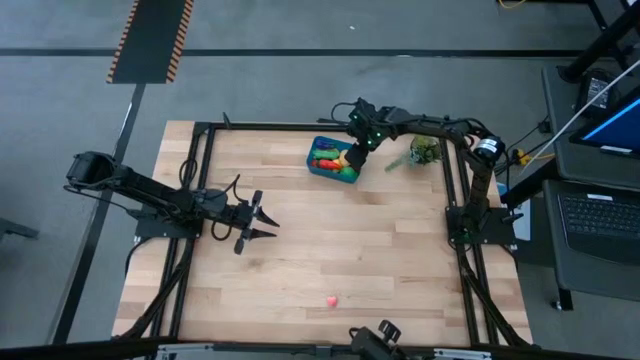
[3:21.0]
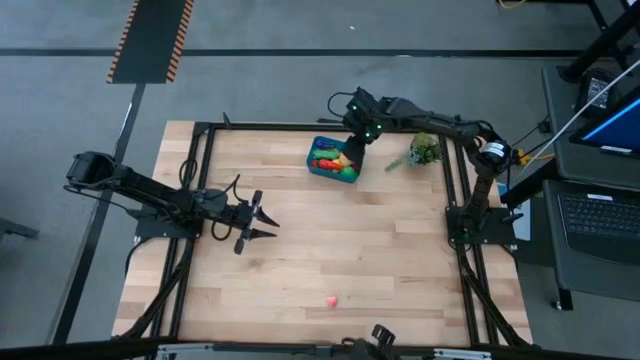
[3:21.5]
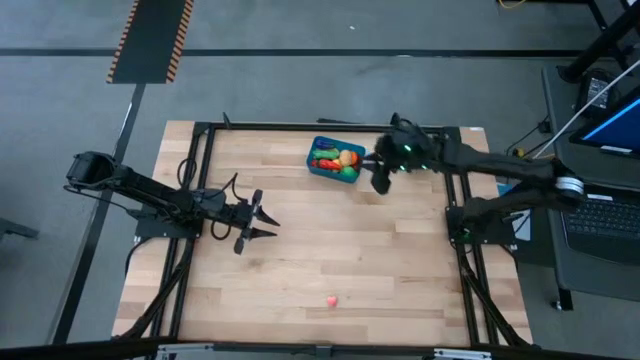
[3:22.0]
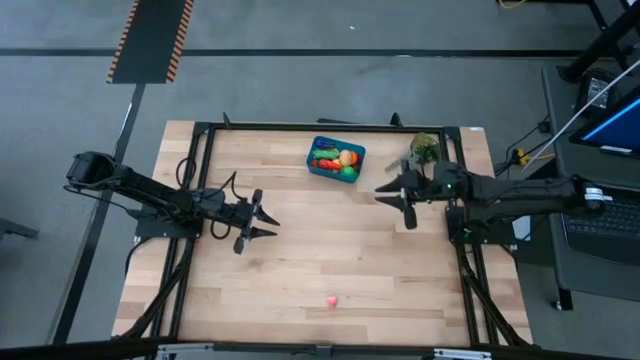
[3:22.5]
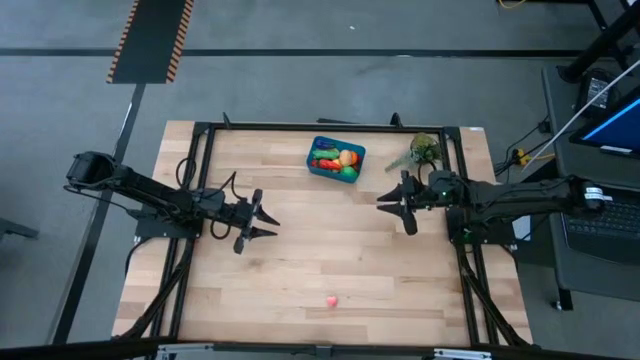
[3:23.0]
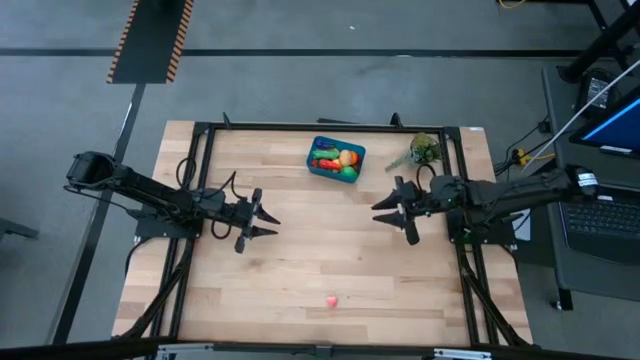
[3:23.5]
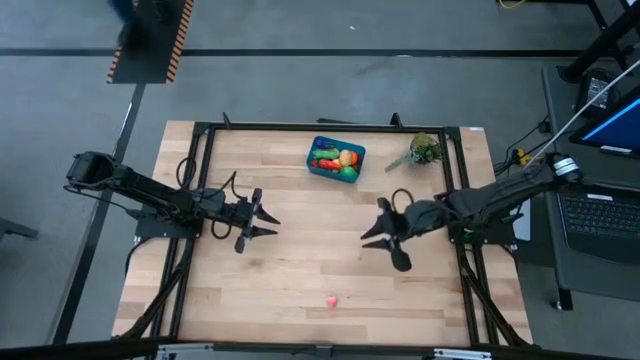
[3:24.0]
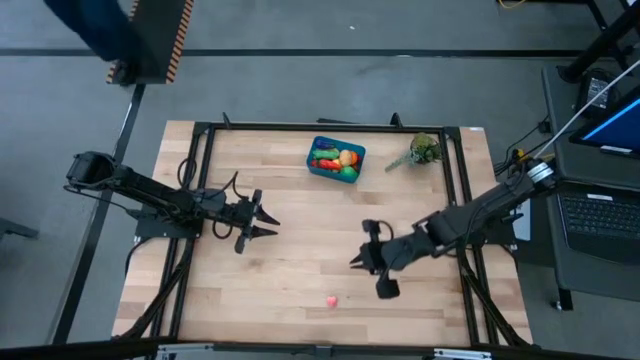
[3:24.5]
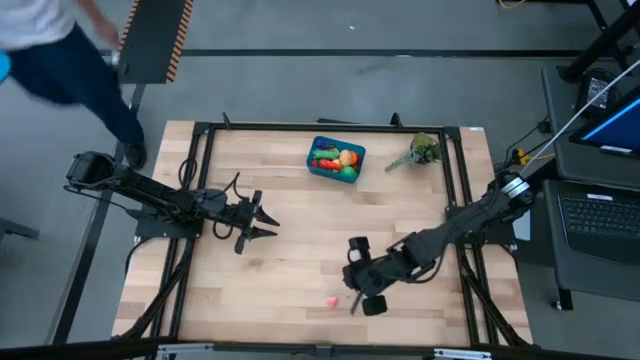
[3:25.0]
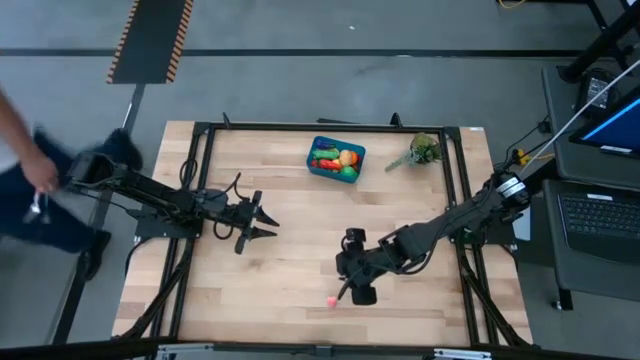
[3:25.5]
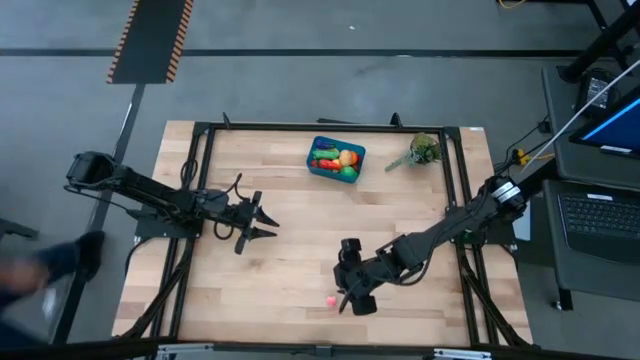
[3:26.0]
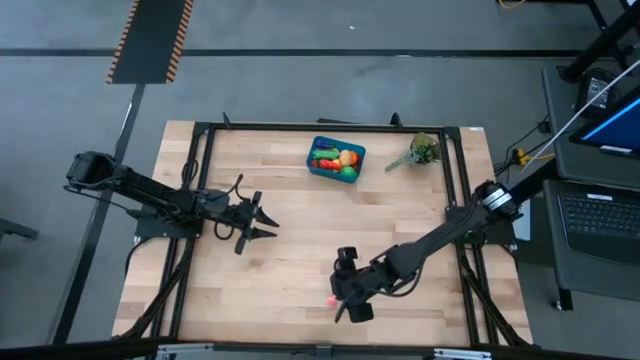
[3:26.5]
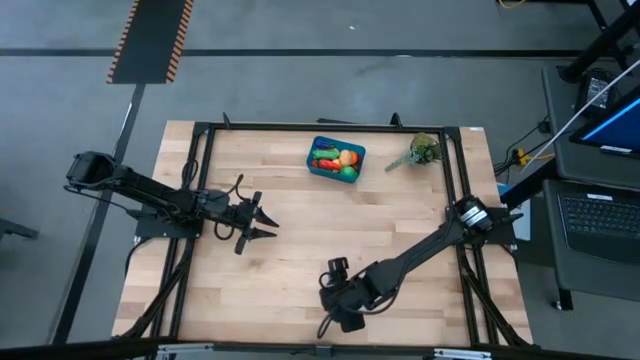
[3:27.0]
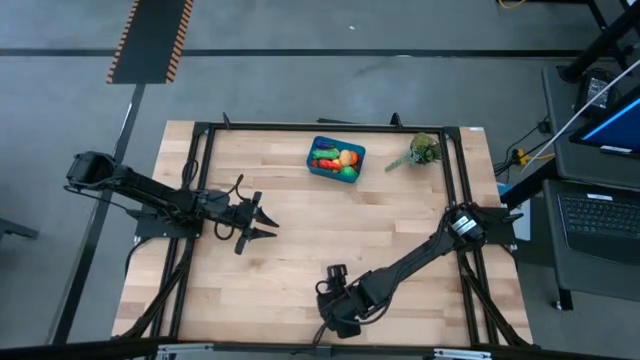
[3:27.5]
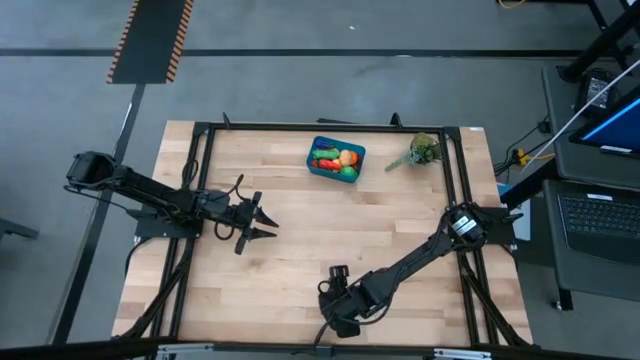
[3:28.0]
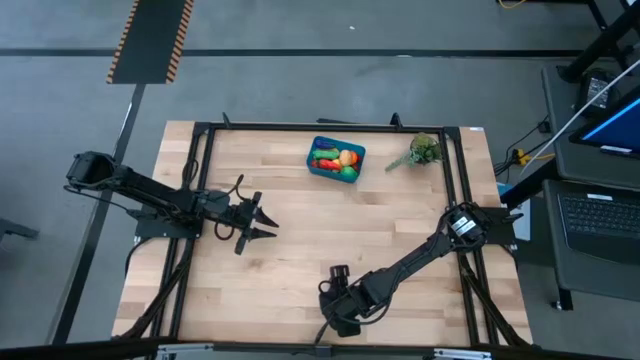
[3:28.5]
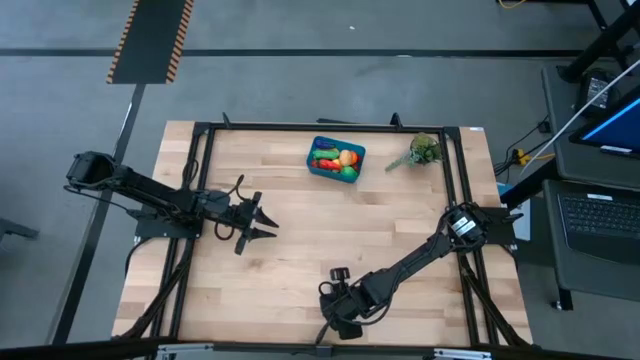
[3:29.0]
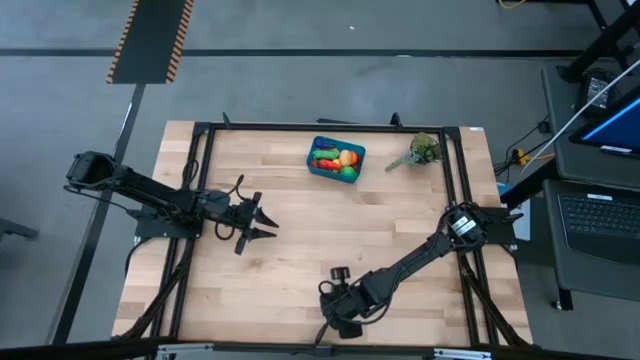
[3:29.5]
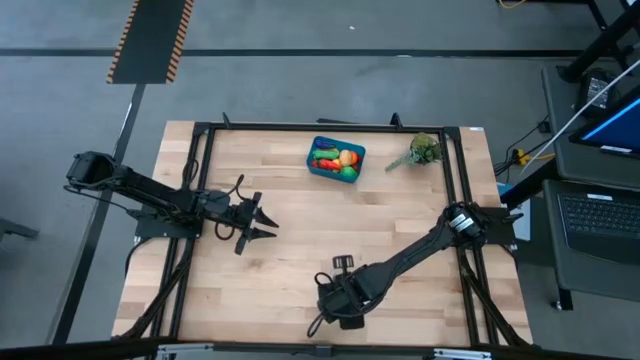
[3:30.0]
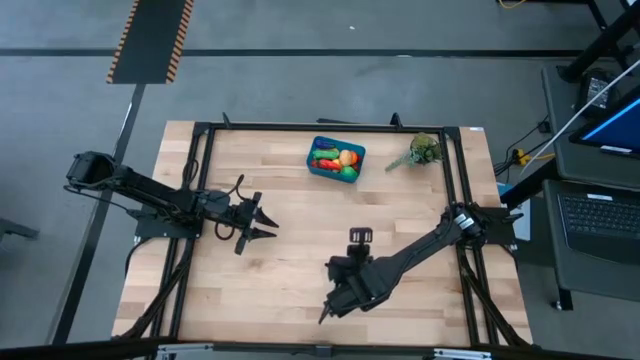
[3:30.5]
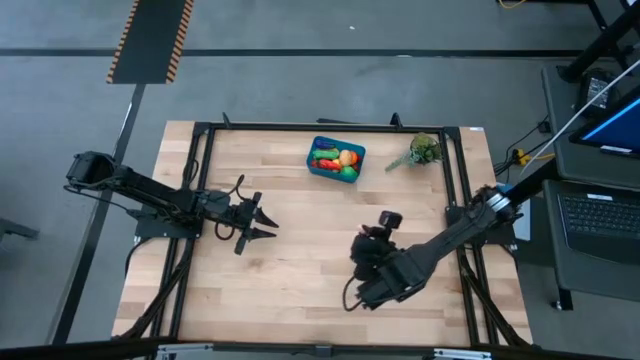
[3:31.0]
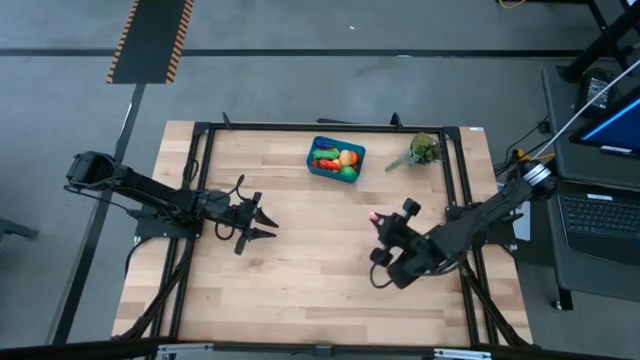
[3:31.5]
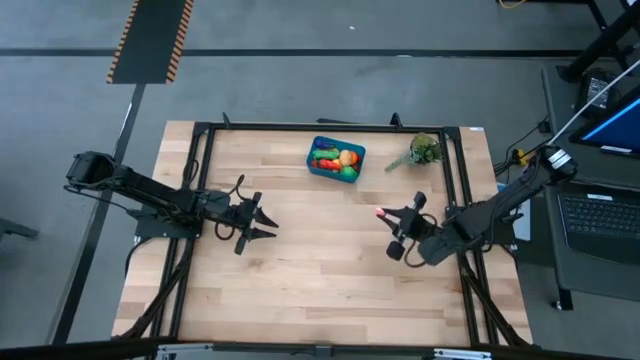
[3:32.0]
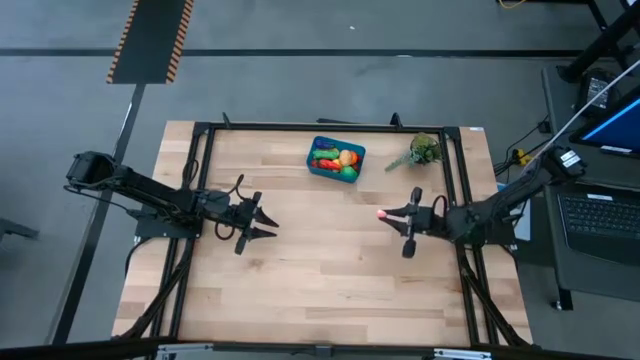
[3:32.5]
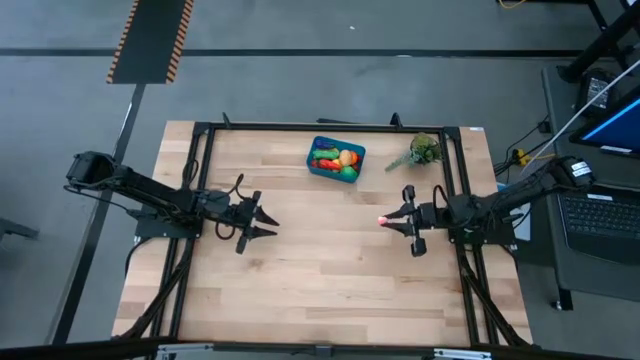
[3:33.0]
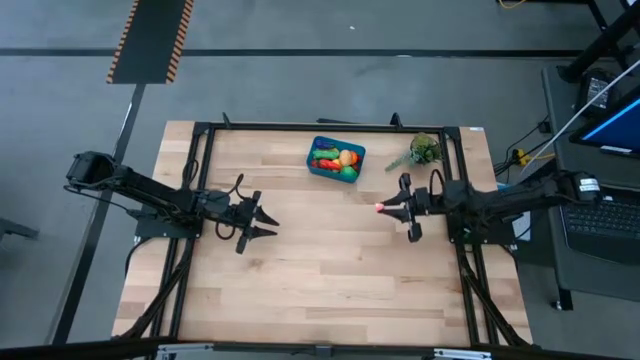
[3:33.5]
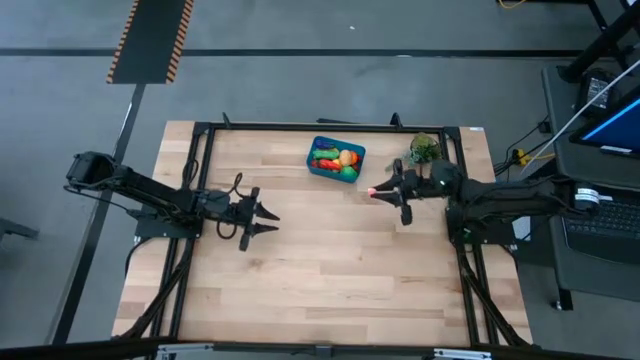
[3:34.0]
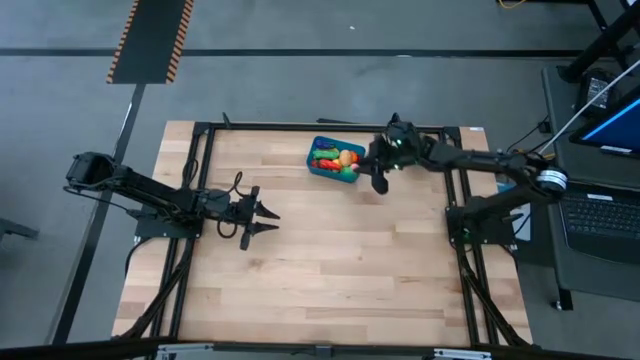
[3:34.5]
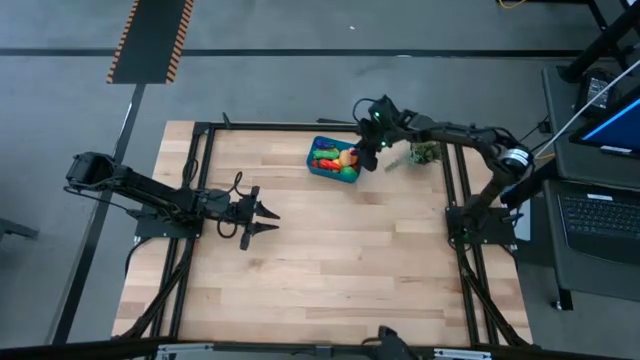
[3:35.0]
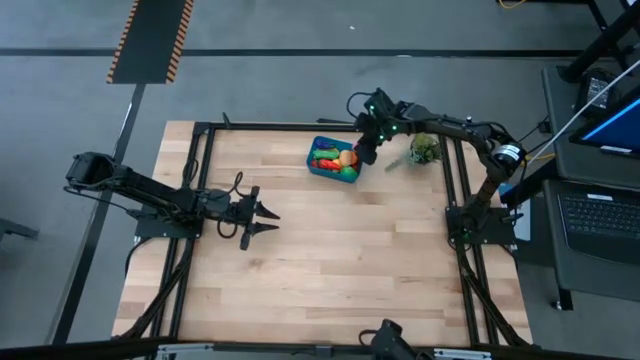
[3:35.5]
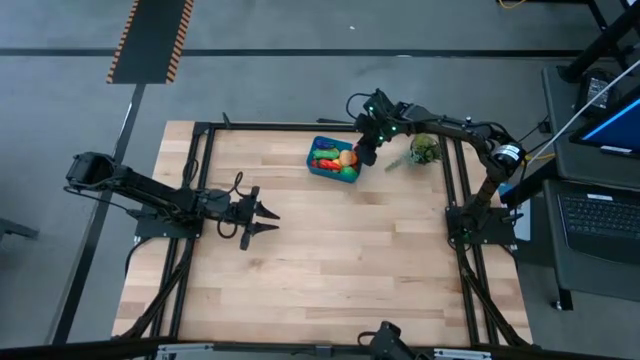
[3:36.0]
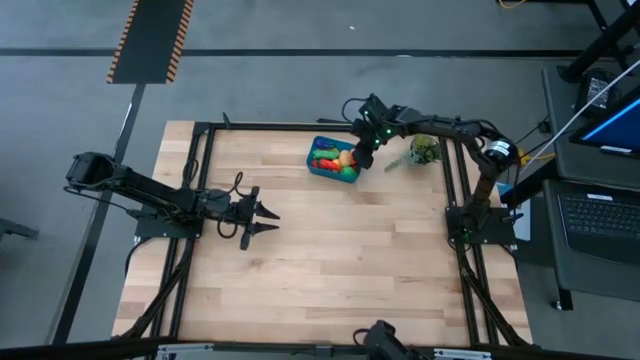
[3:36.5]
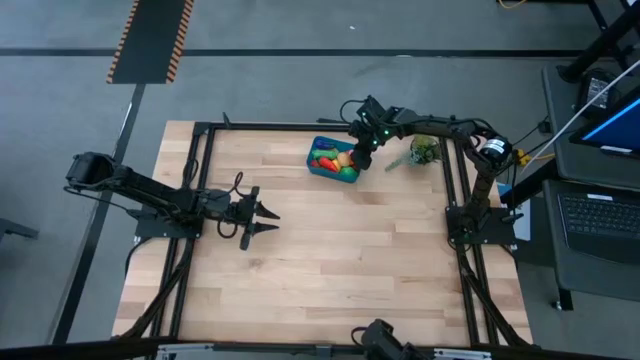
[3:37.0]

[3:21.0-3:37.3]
Task: Pick and placing Produce into tupperware
Put the pink apricot into the blue bin

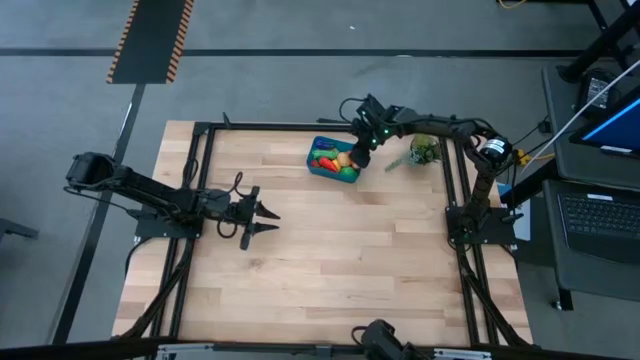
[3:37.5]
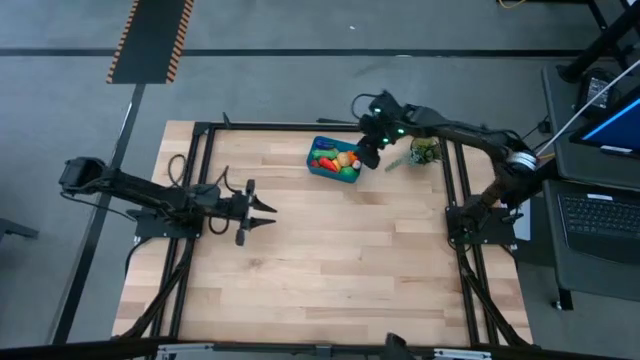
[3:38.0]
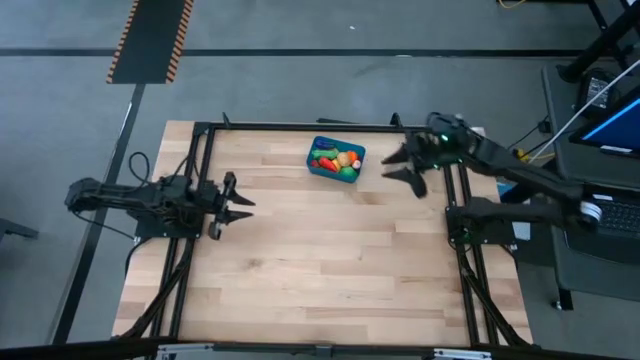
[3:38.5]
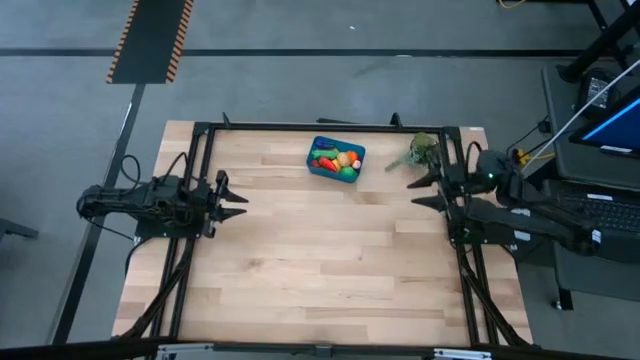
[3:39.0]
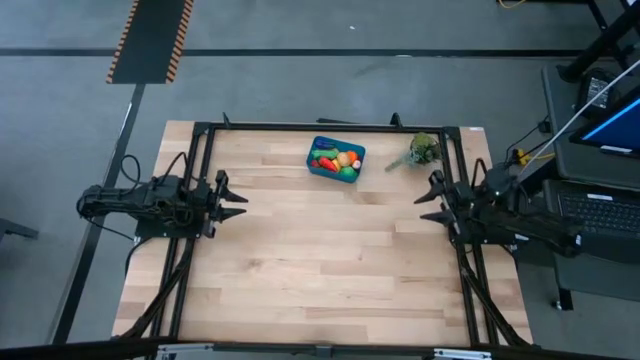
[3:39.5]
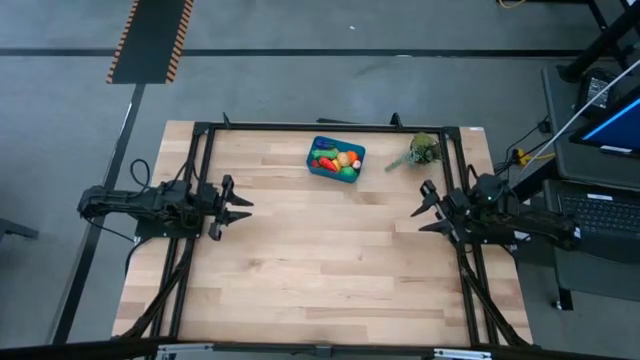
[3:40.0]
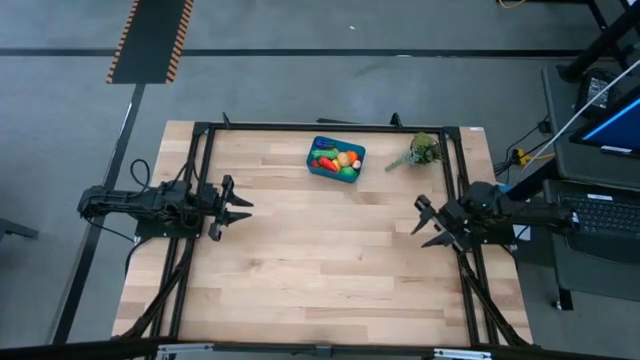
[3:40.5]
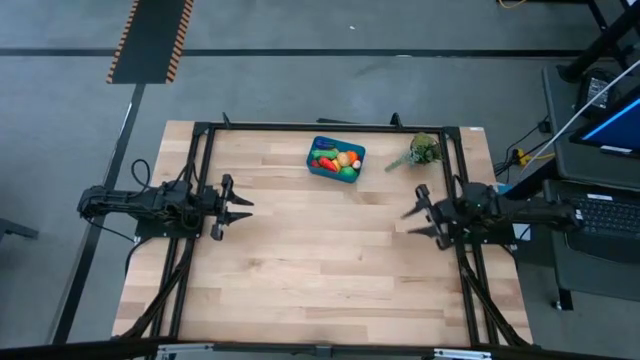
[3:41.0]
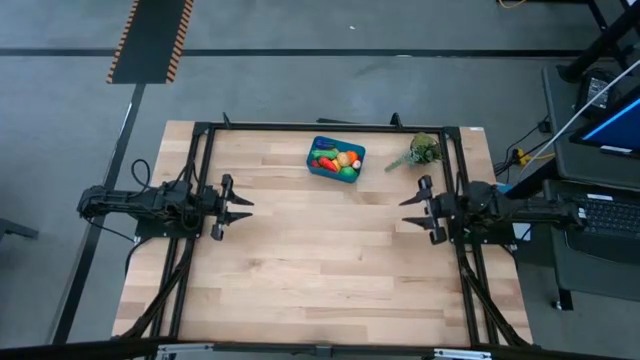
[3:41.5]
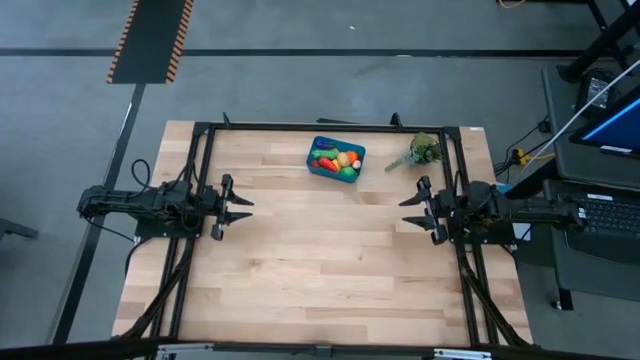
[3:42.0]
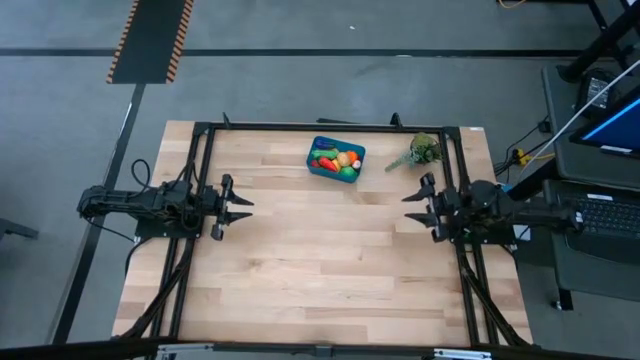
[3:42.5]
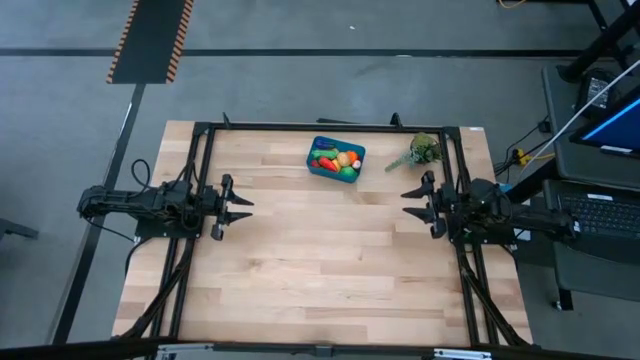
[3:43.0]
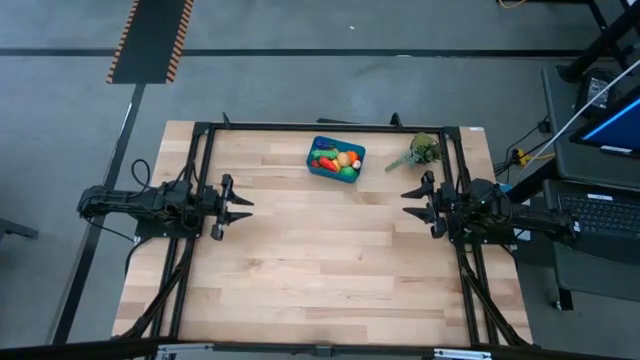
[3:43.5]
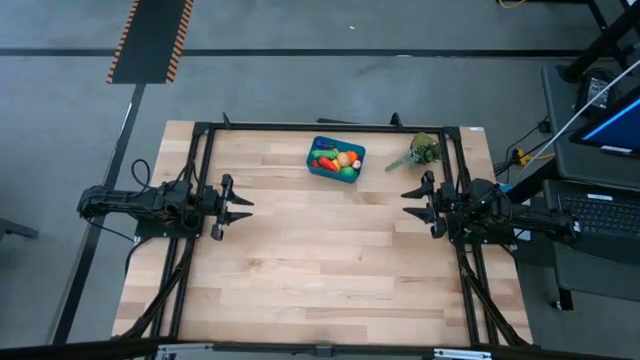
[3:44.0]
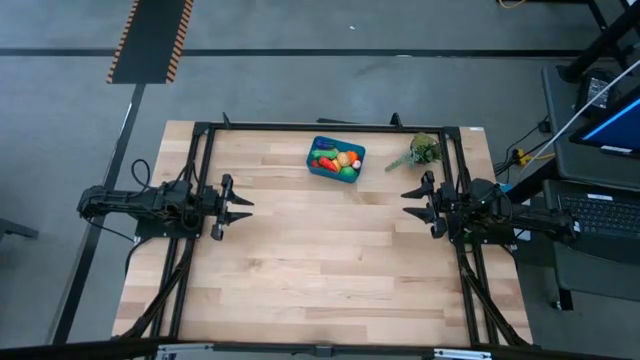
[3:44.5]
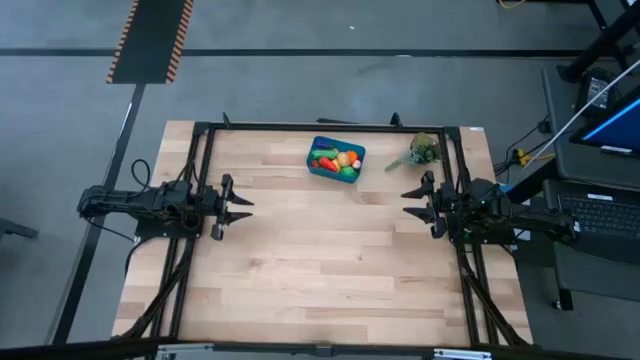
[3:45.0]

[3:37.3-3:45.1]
Return to Home Position
